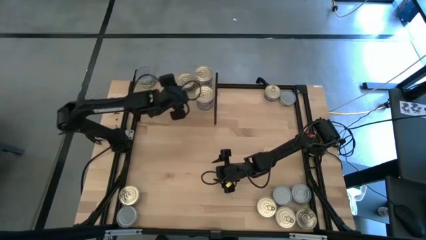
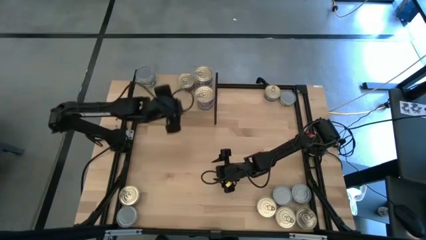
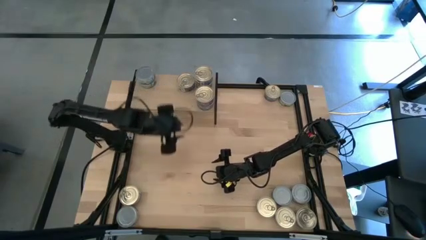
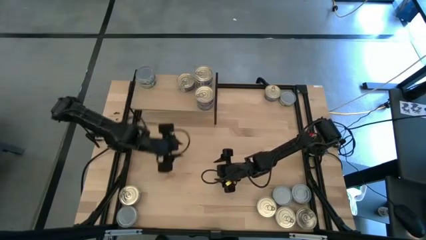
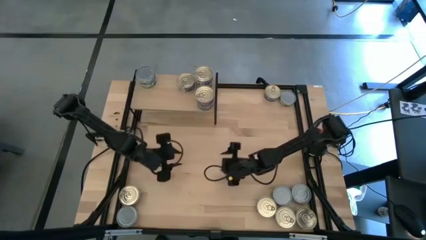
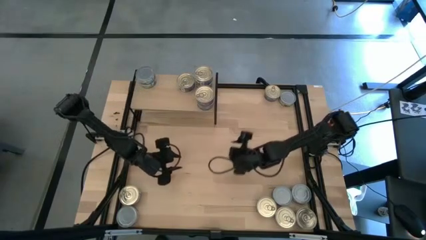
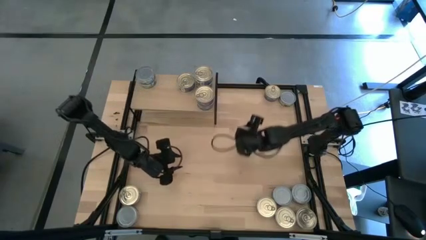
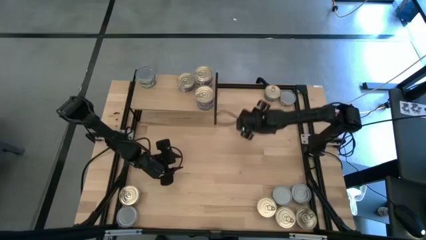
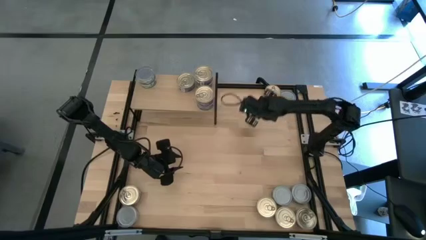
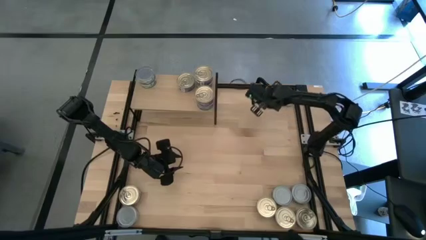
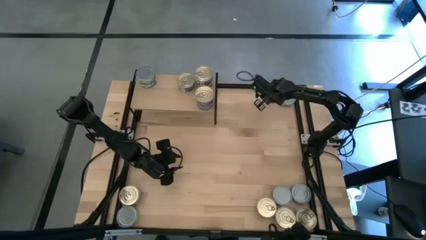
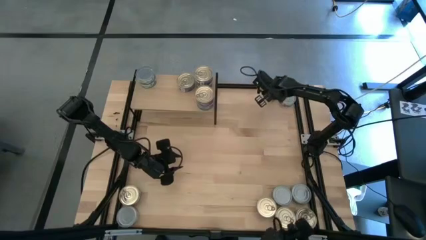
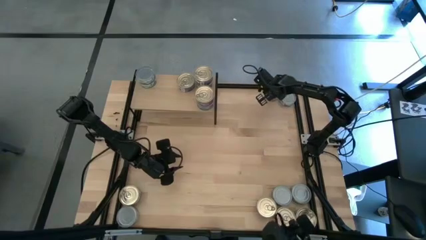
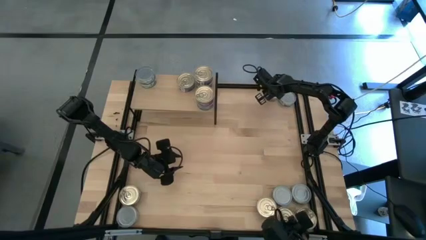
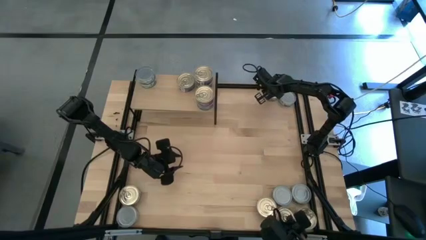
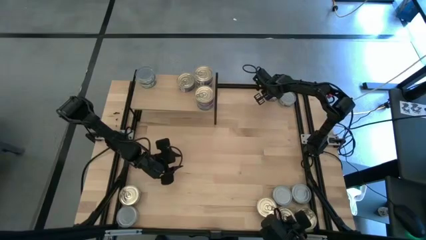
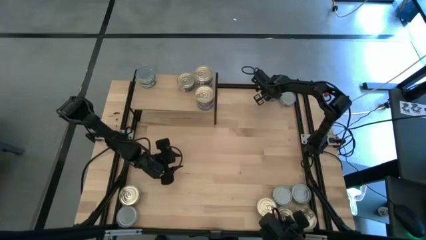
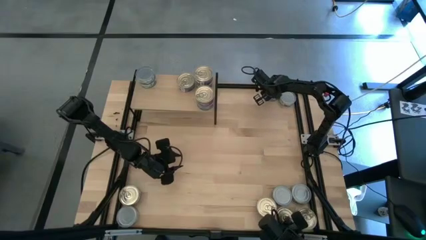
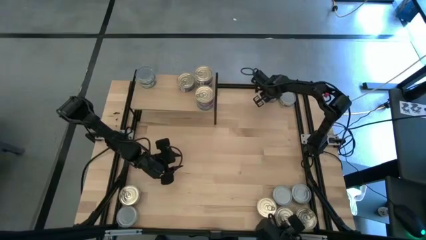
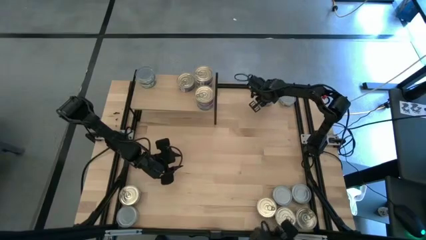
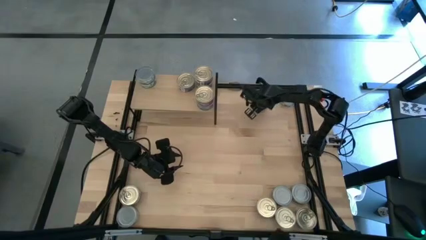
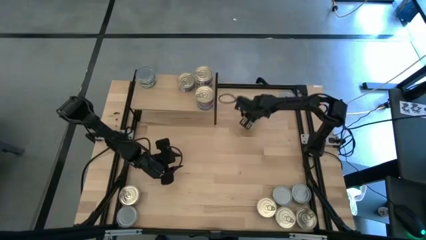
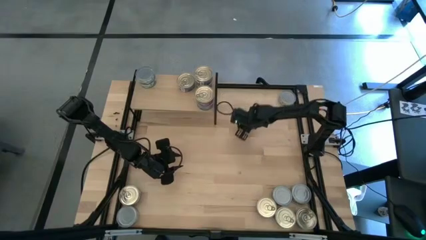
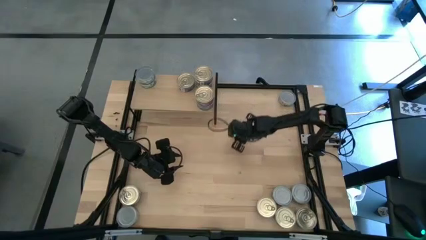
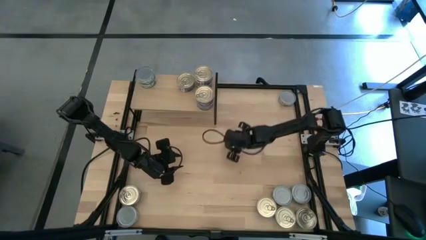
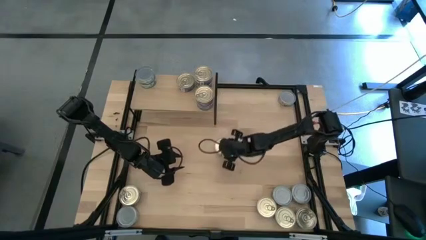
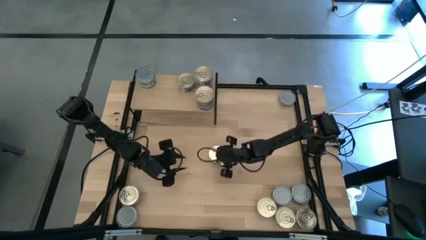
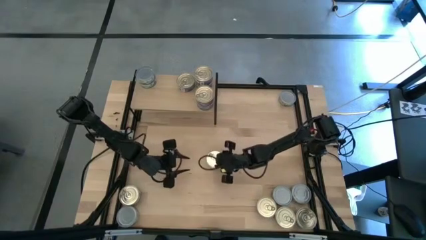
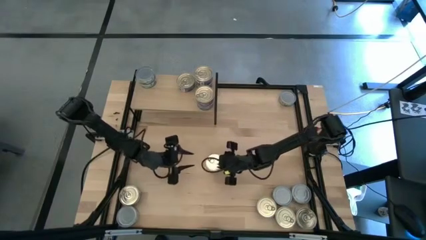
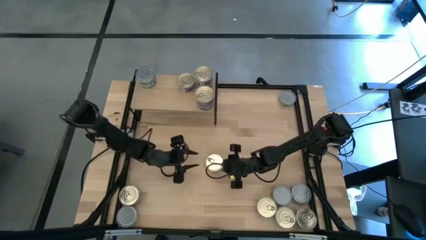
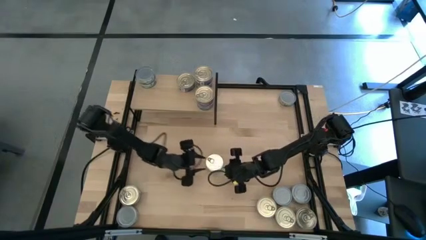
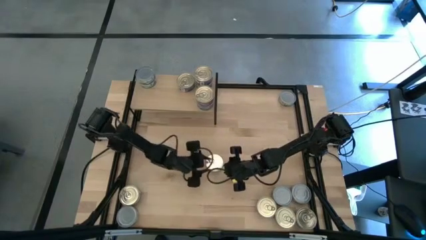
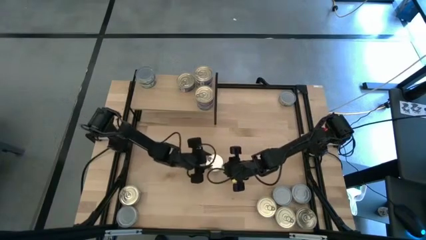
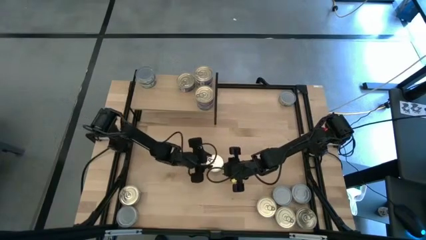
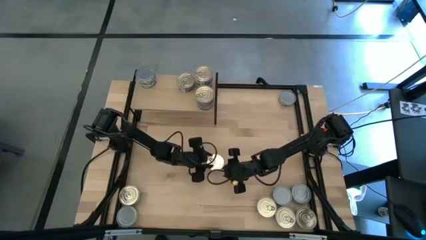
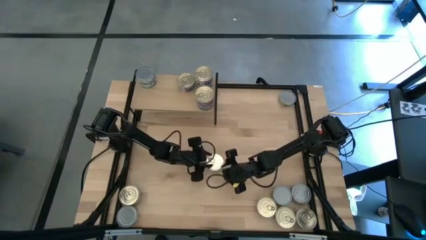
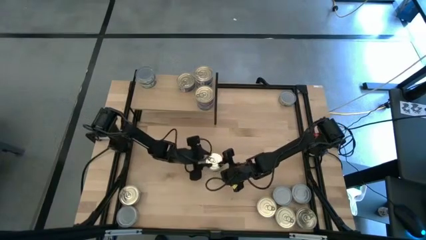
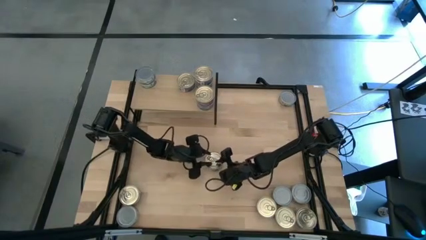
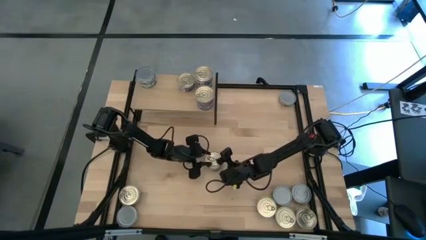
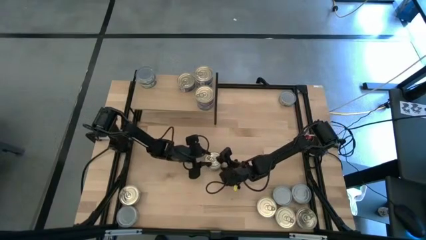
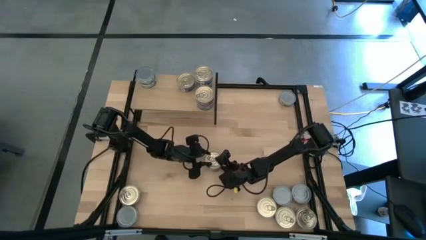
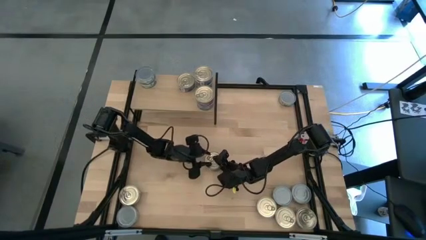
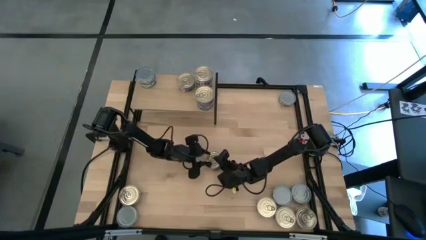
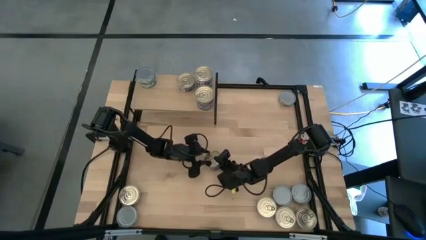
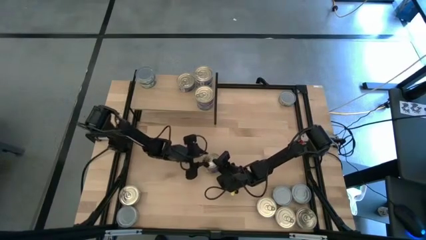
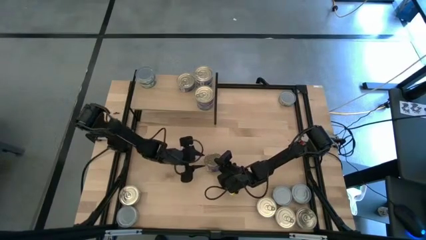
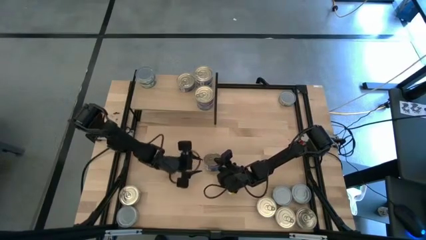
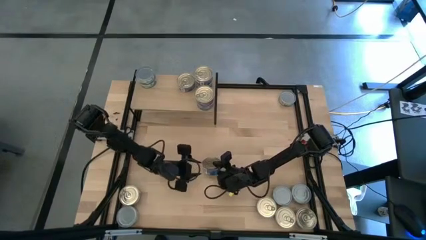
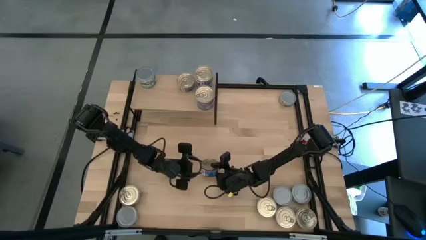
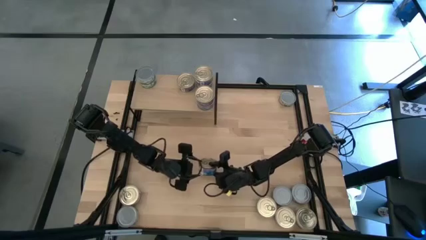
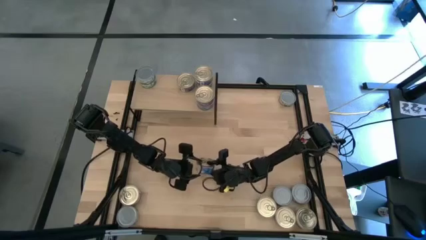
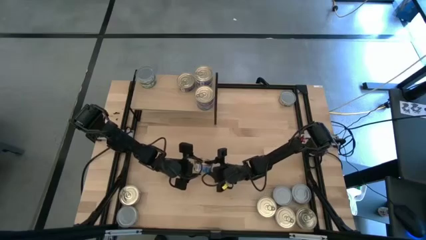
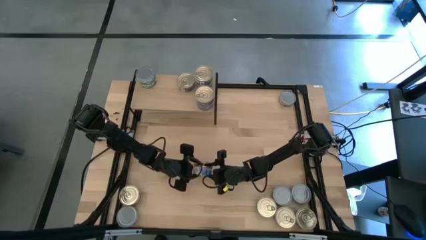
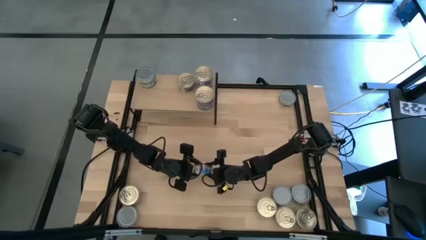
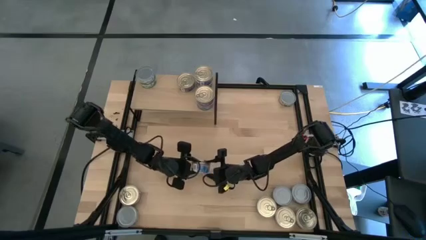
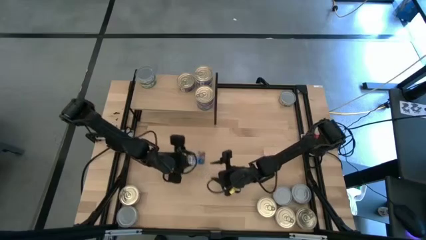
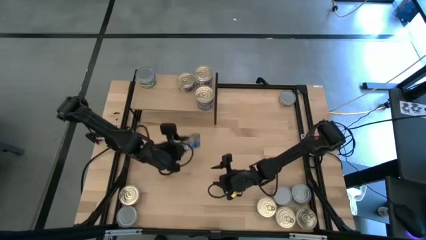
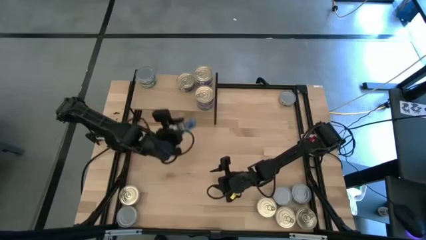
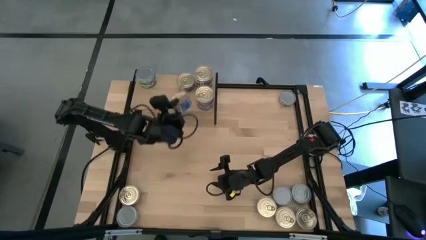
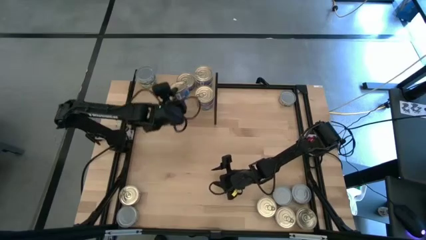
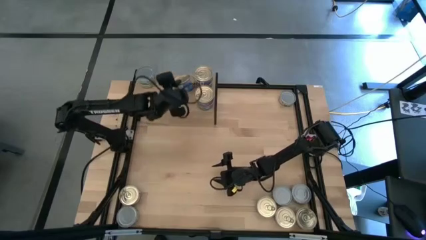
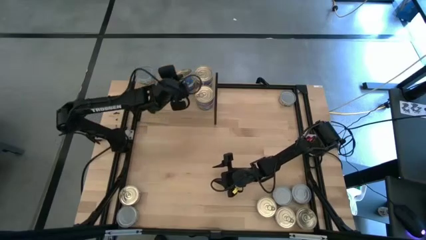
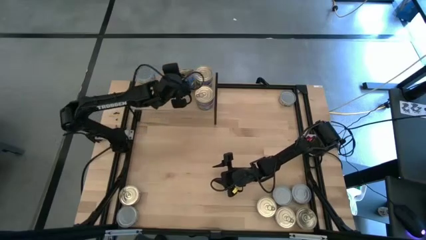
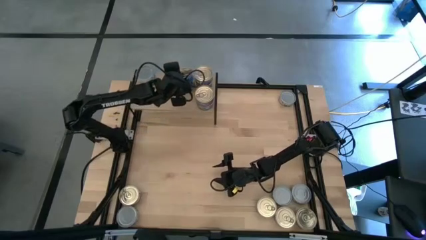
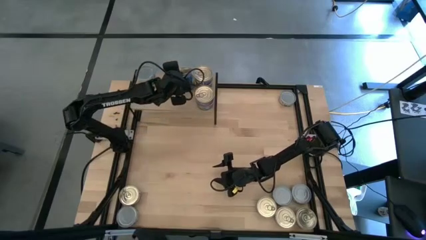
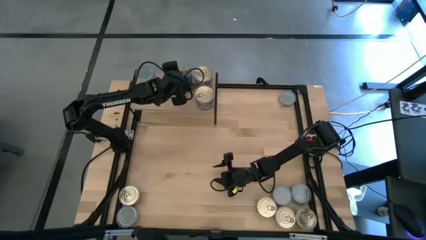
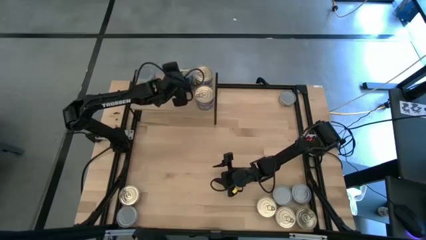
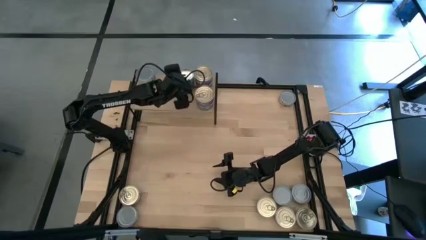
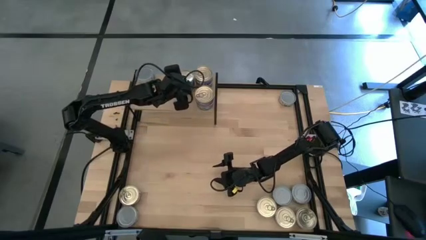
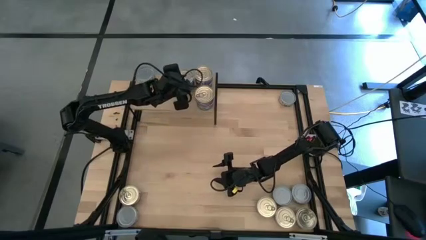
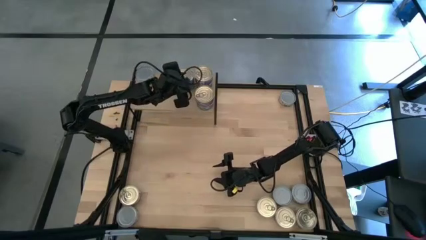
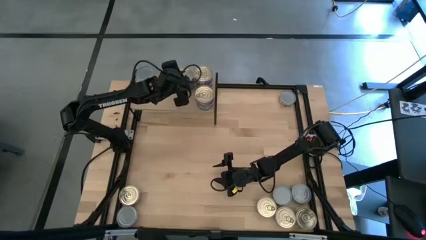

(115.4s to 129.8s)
Task: Stack canned seafood by type on shelf
Stack the blue tuna can on top of the blue tuna can on the shelf

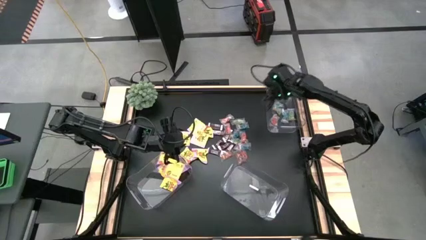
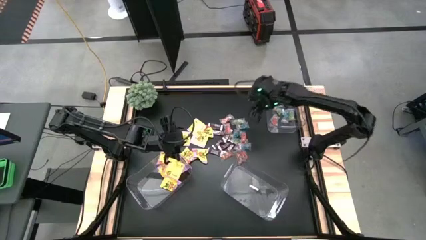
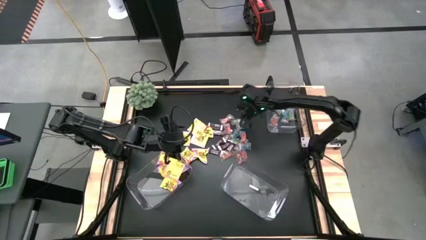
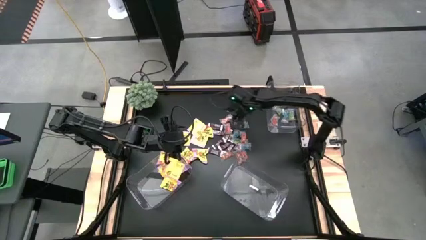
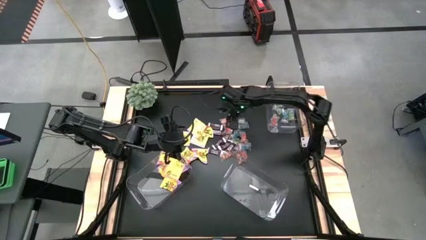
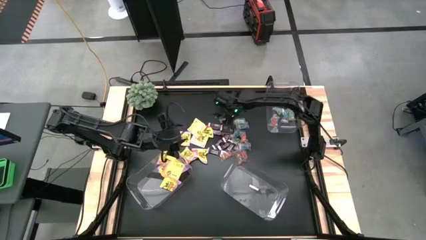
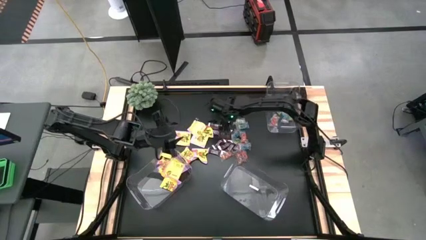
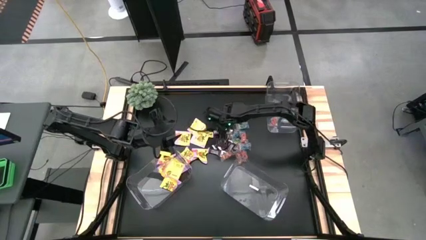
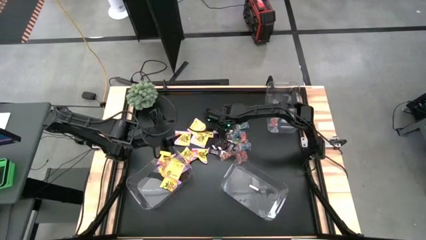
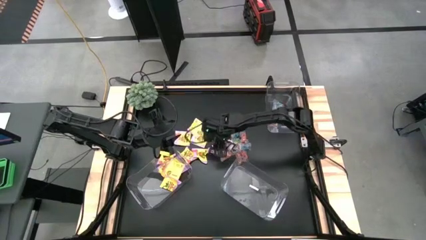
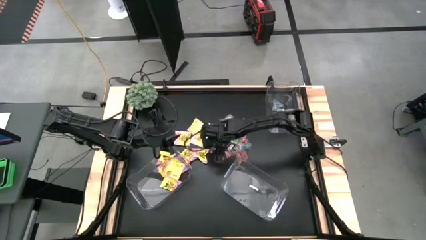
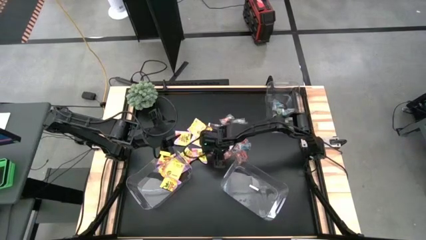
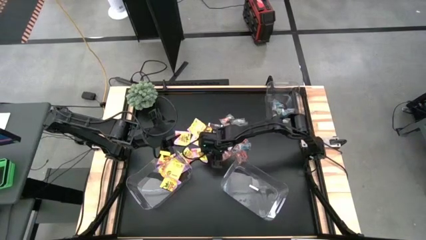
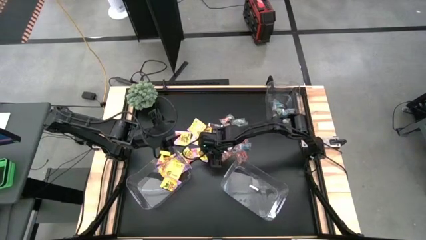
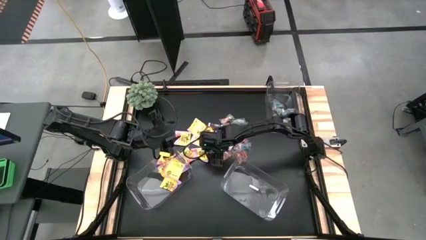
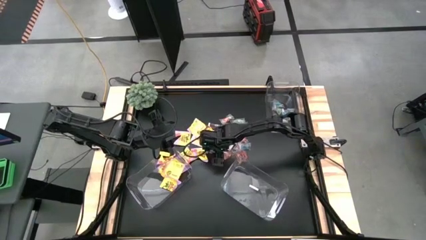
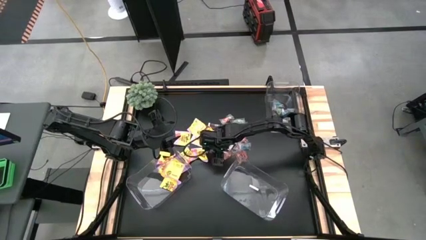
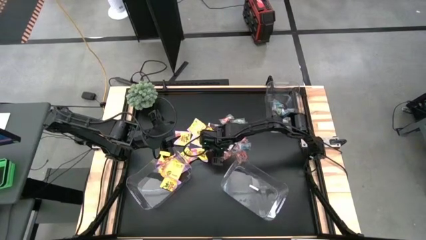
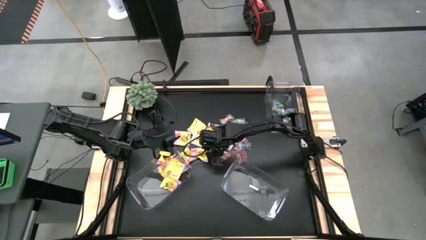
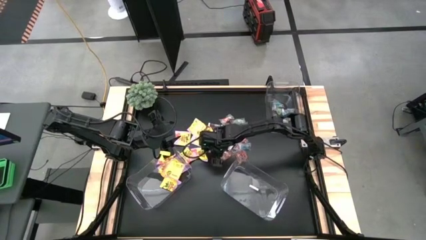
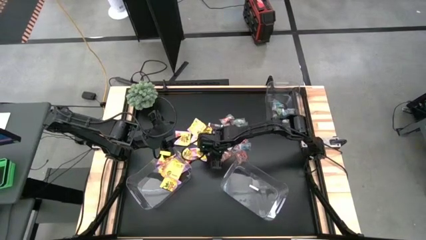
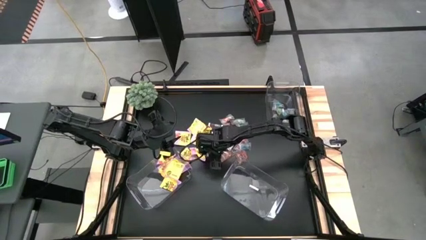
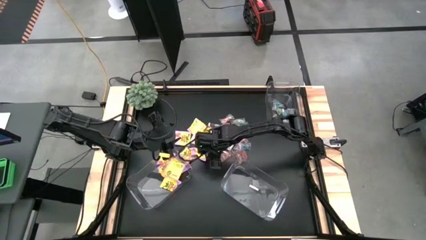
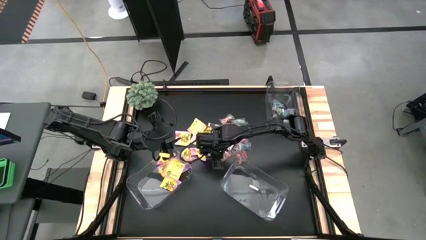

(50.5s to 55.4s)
Task: Sort candy
Put the brown candy in the bottom right transparent container
